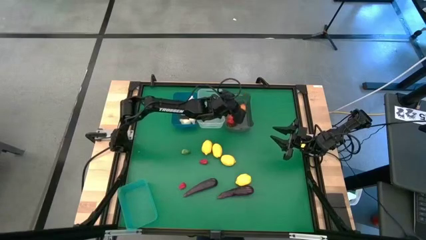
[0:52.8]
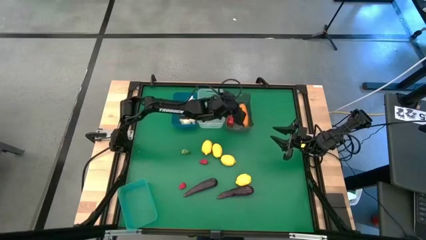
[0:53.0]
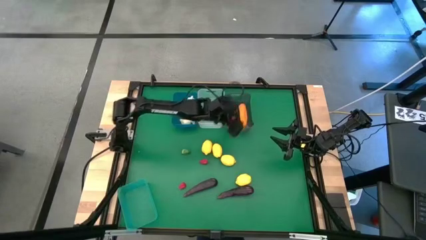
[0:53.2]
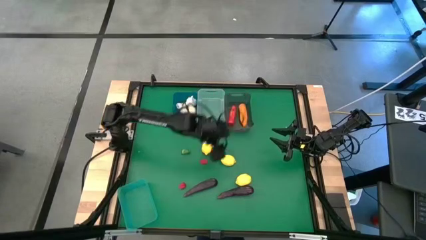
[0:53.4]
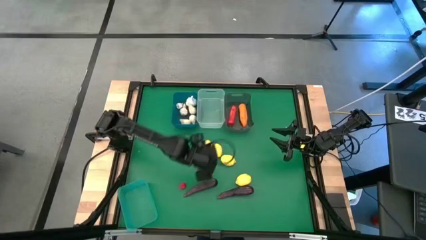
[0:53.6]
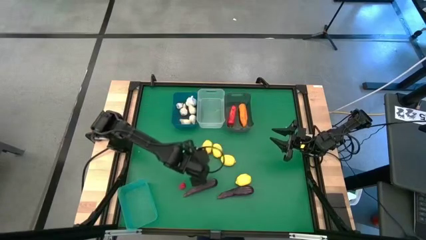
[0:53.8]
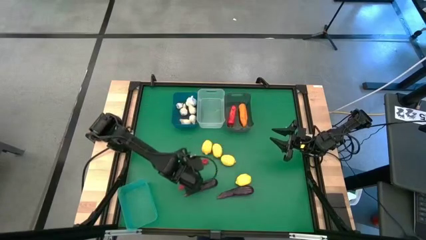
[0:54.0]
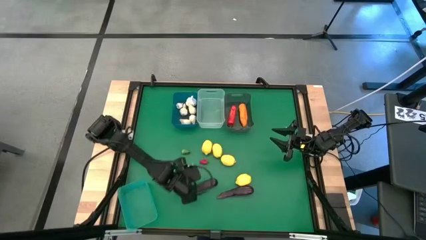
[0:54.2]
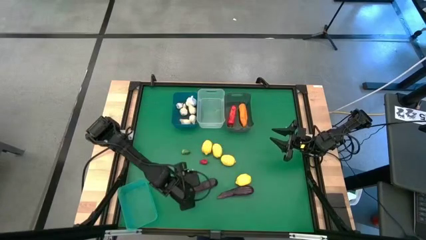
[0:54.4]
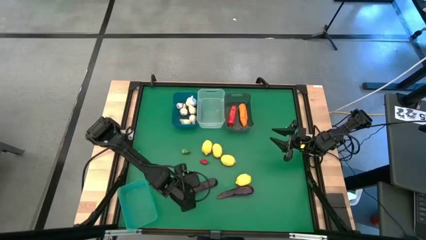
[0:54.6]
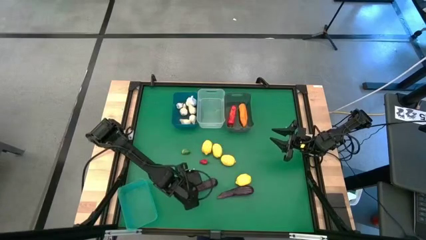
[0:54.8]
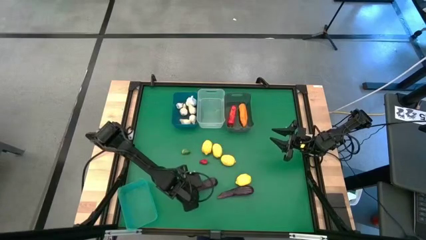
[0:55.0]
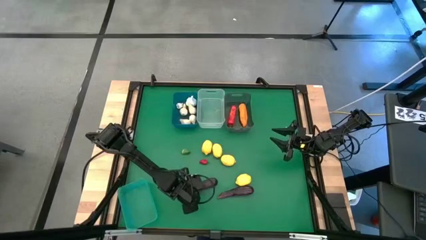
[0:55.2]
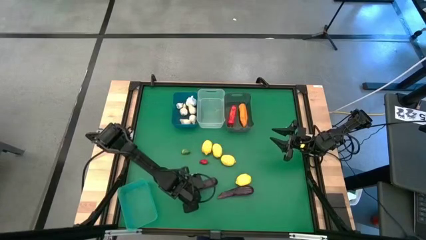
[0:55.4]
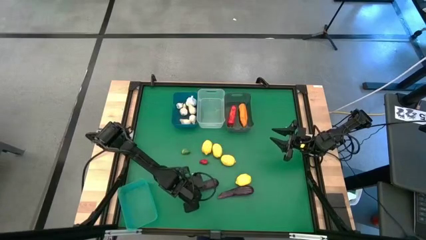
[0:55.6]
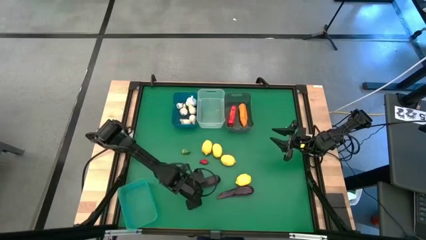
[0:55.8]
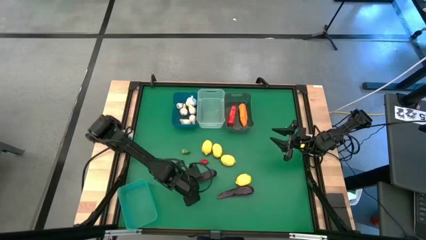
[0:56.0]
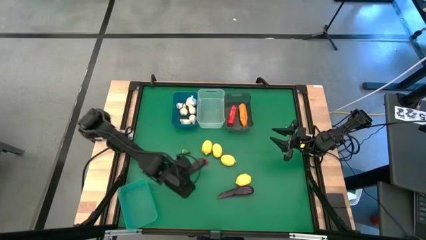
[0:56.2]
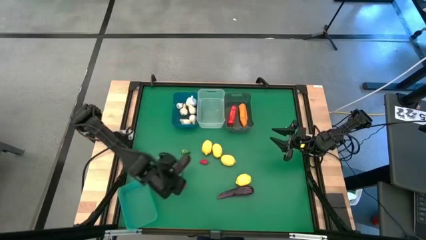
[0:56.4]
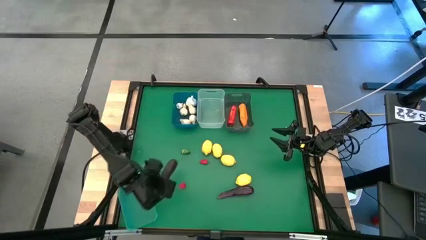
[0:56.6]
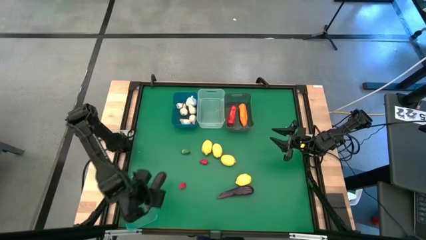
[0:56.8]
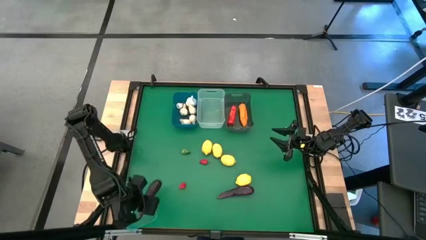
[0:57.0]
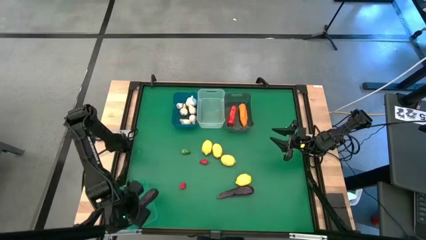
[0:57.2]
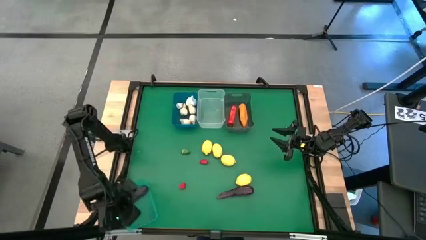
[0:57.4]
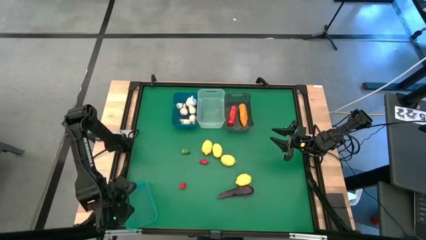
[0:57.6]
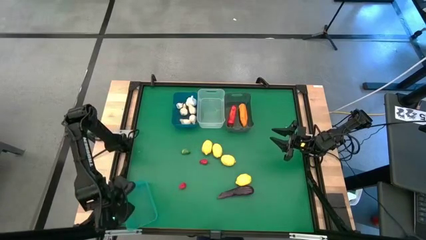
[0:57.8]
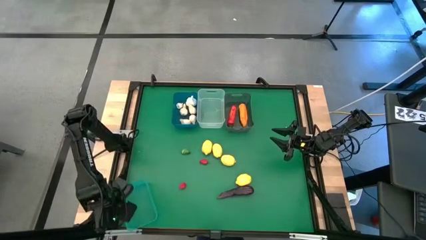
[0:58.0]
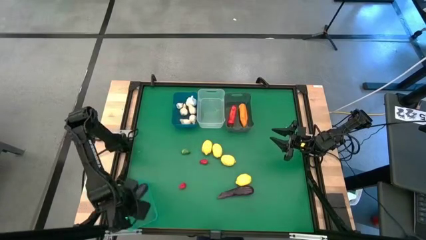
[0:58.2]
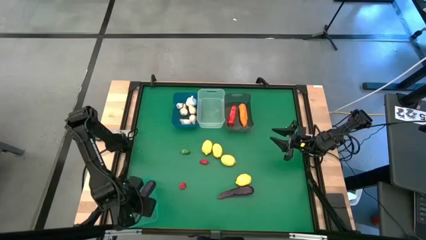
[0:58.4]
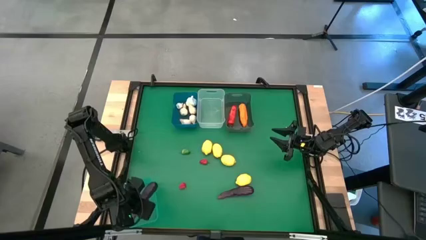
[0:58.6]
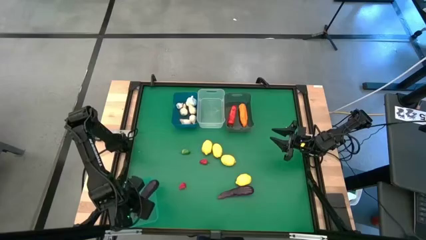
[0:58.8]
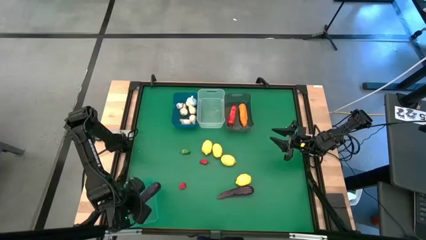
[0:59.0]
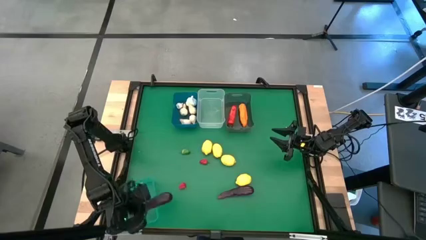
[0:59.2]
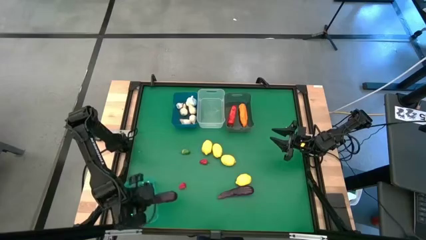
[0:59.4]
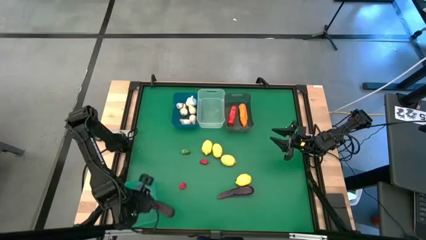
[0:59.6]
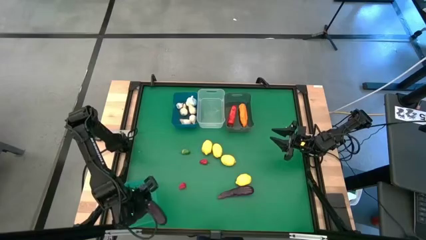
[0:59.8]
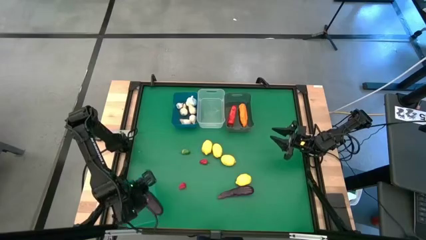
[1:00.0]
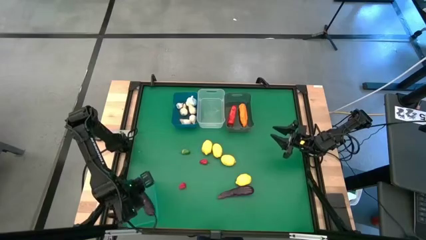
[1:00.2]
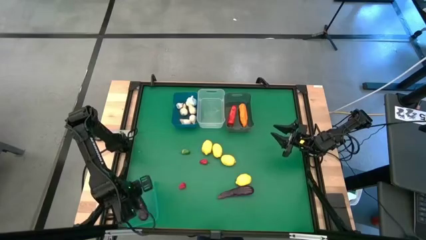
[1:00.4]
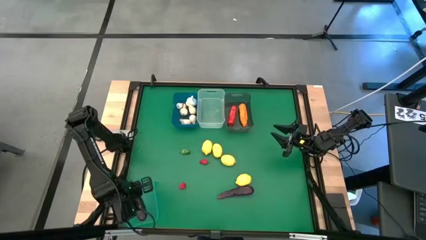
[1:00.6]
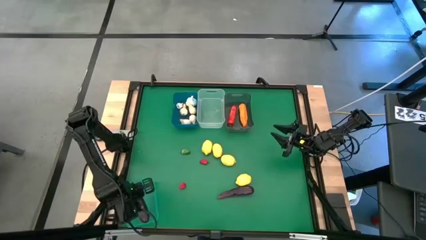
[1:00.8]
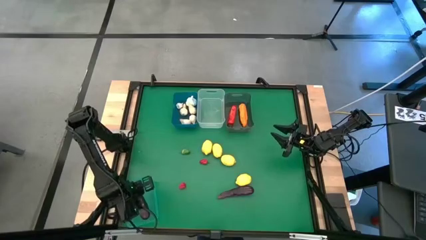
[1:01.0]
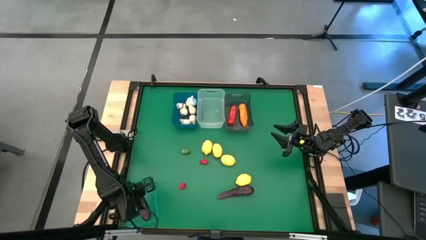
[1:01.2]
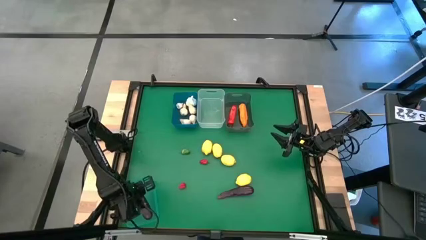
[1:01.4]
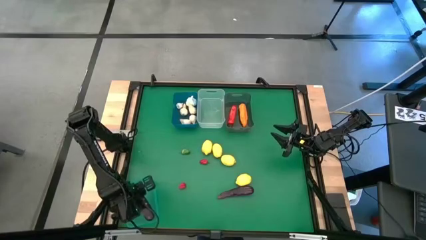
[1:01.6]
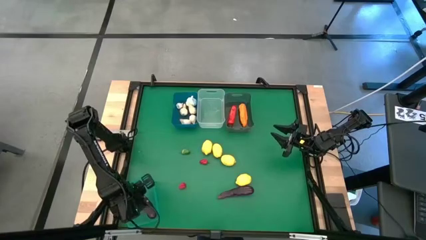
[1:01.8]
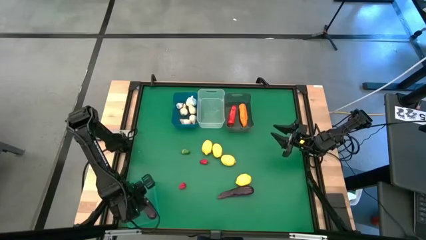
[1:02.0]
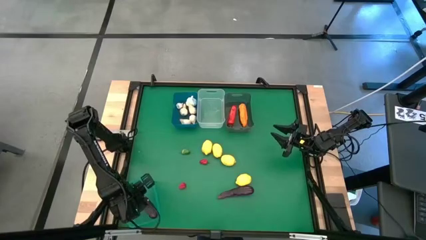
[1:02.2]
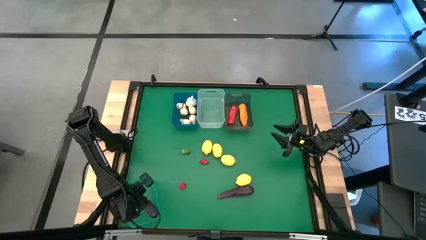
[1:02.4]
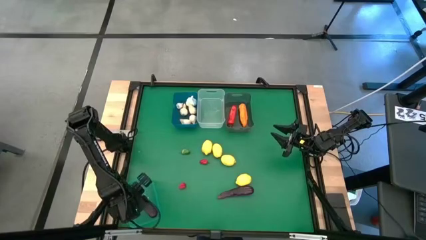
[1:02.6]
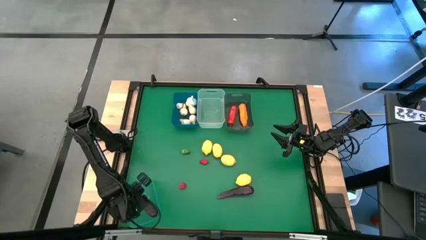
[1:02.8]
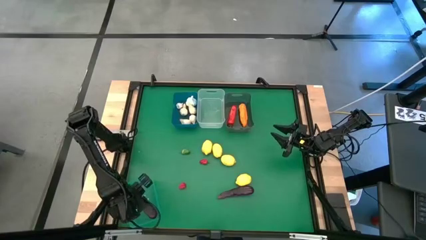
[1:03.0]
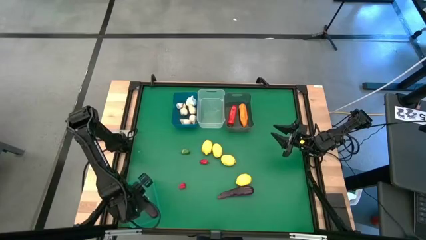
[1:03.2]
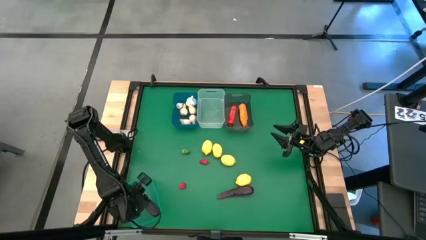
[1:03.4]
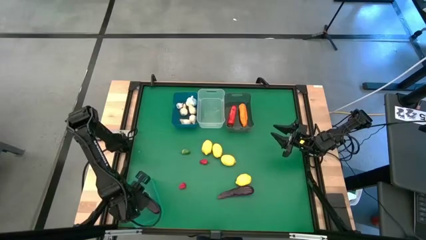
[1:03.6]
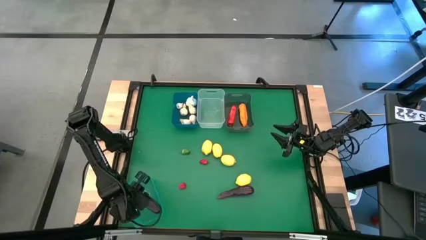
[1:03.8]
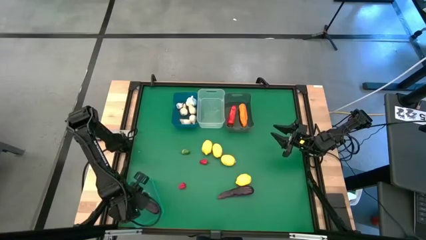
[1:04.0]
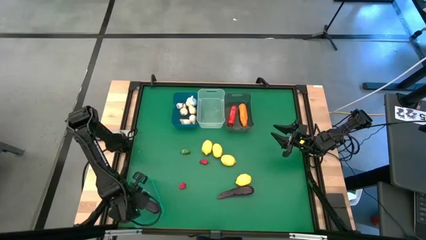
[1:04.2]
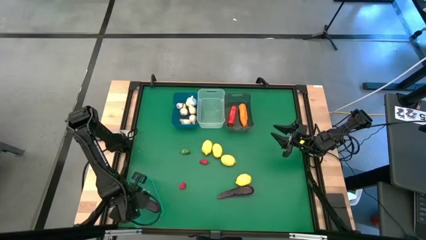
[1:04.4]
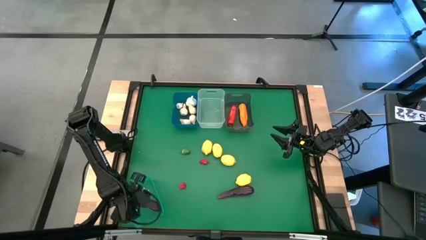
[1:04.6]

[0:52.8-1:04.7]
Task: Sort produce into baskets
Put the purple eggplant into the green bin

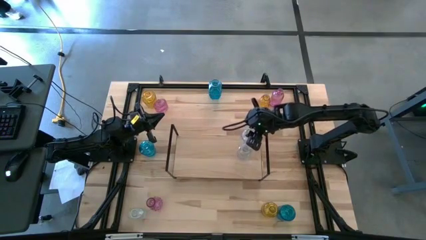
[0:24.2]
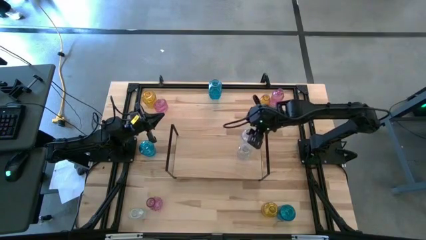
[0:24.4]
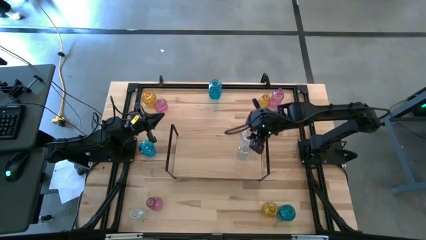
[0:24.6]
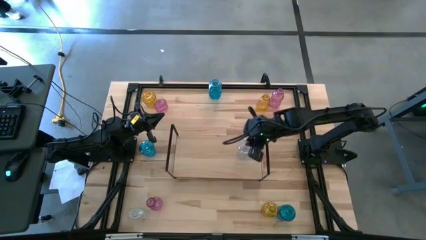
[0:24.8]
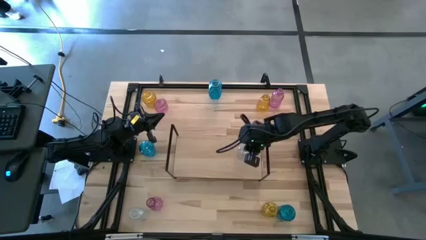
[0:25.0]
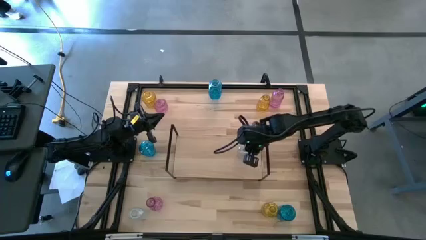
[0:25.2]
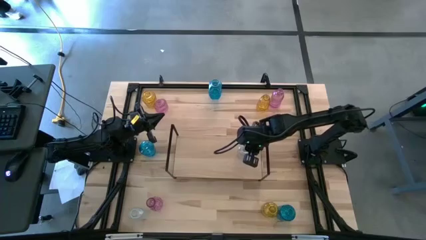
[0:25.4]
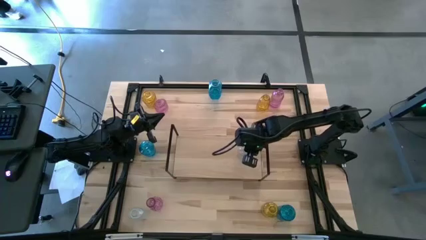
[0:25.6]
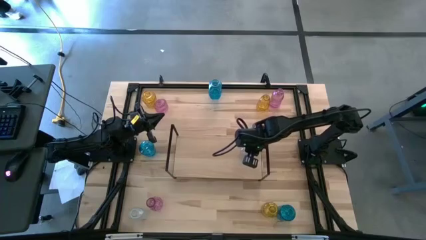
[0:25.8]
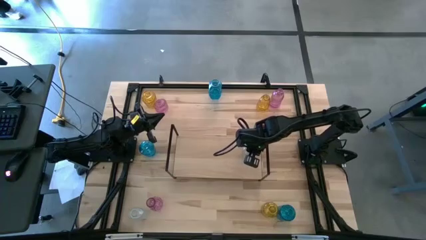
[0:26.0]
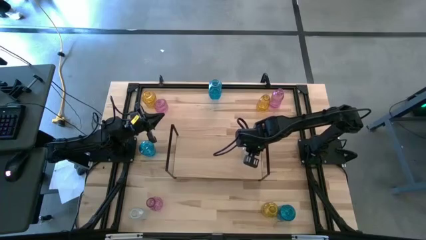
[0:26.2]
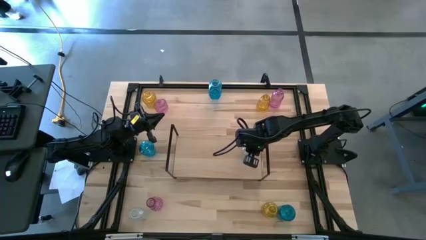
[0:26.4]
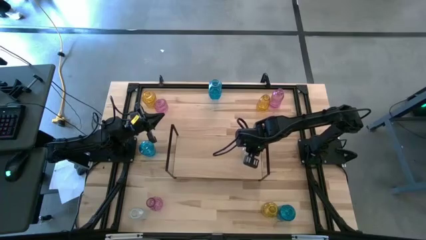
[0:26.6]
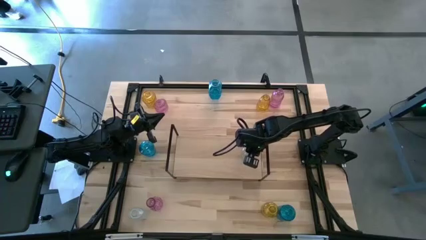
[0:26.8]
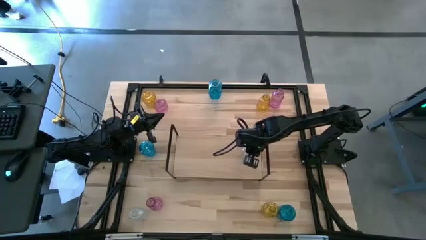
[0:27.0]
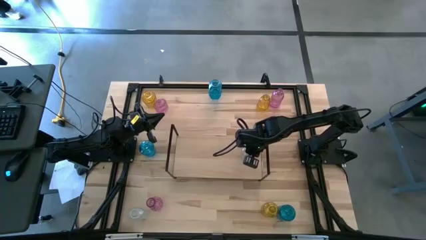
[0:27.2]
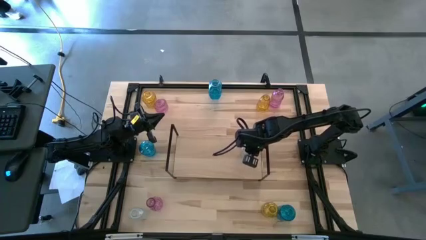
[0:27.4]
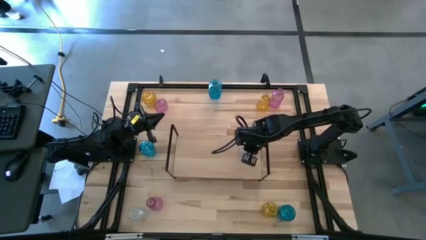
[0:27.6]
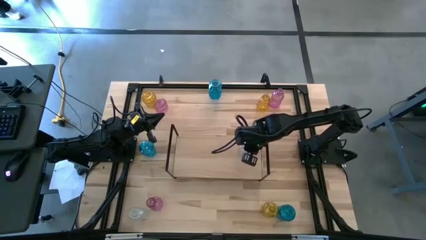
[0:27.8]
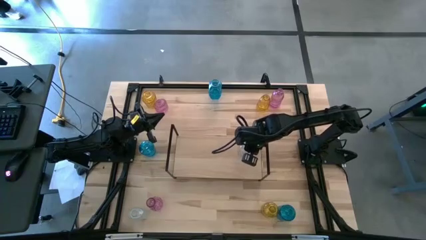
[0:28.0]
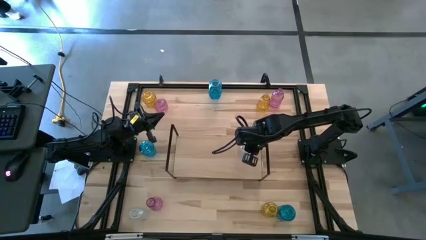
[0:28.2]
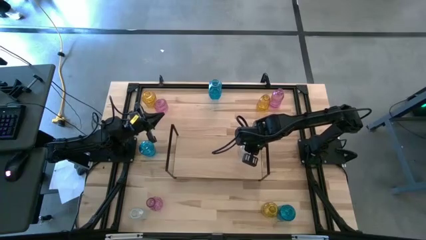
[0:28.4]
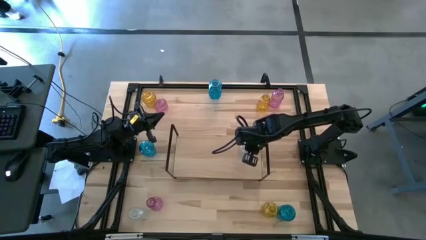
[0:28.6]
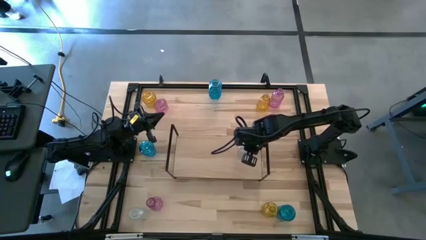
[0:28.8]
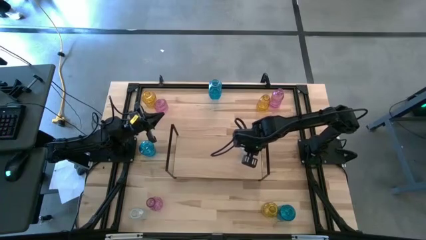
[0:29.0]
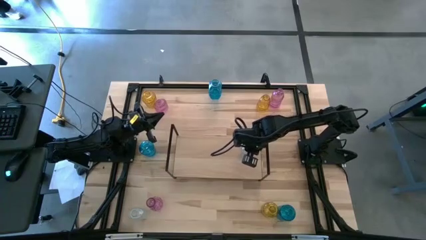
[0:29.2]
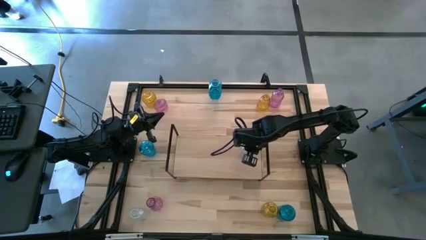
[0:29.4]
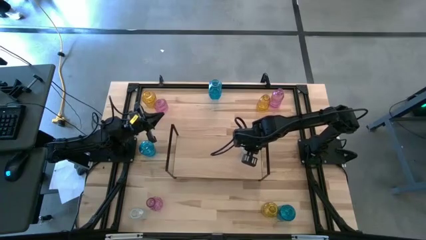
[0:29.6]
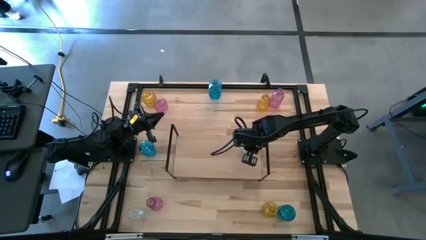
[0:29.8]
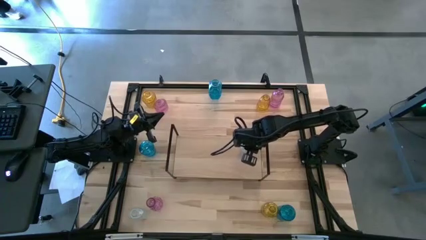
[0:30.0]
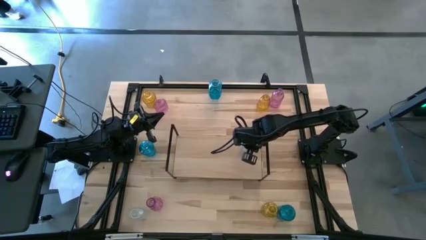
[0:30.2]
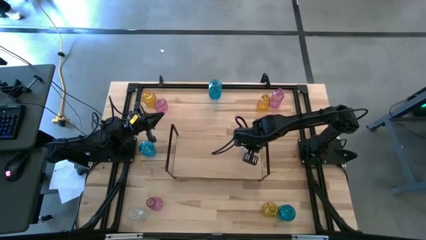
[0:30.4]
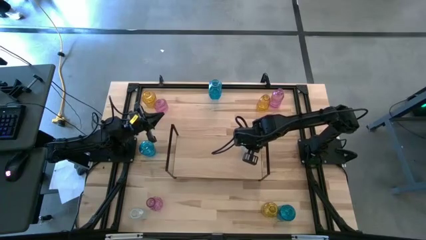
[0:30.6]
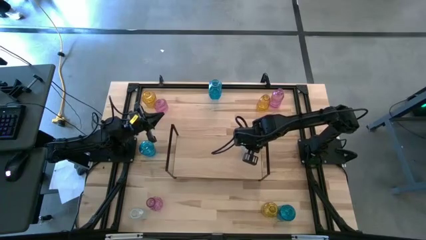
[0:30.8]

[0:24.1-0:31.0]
Task: sort vases onto shelf
Adjust the transparent vases on the shelf
